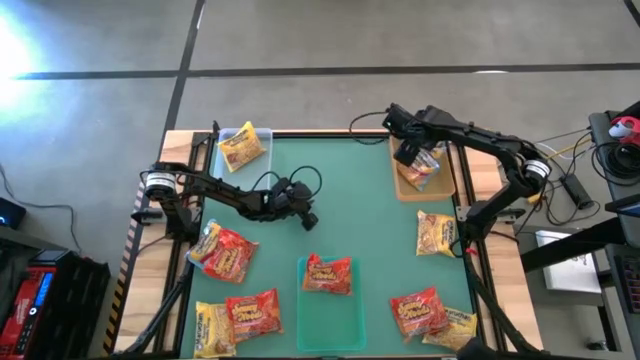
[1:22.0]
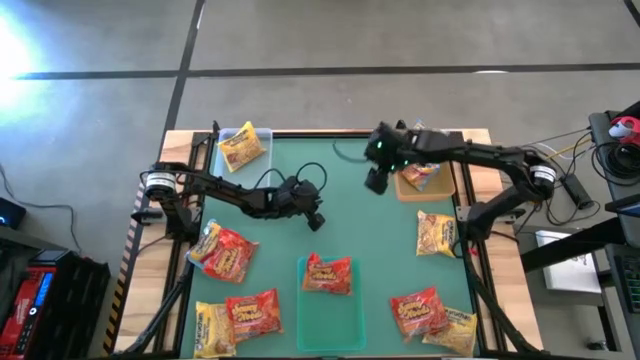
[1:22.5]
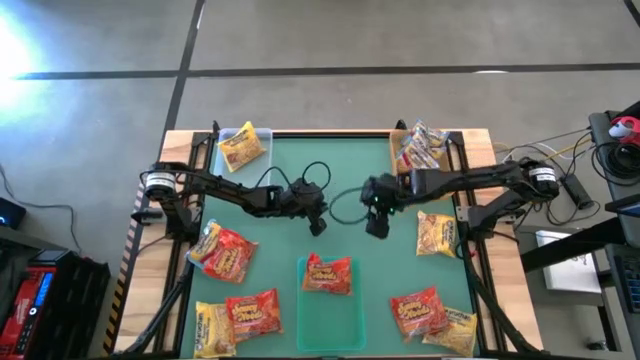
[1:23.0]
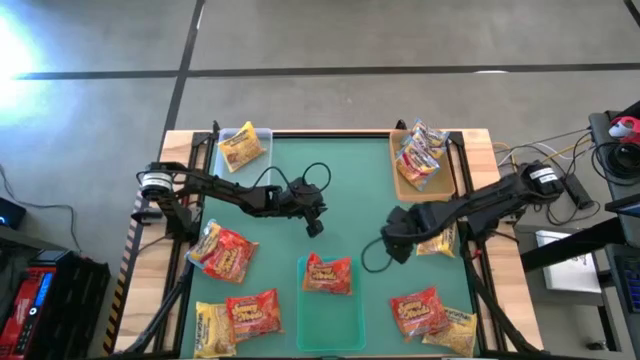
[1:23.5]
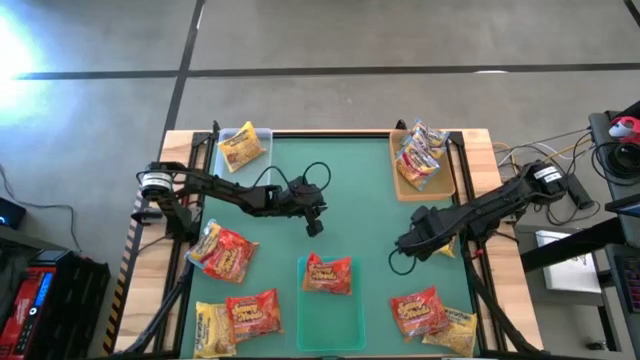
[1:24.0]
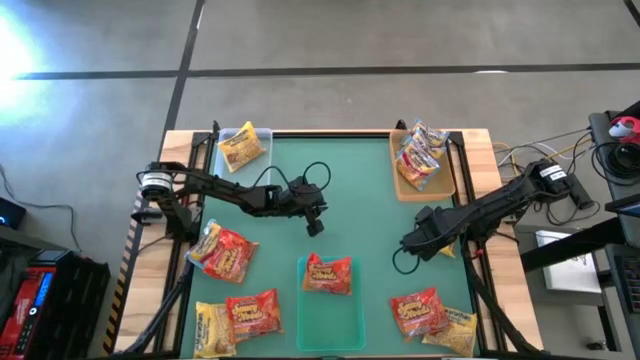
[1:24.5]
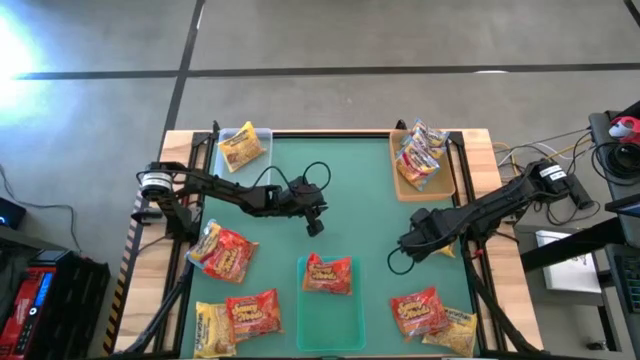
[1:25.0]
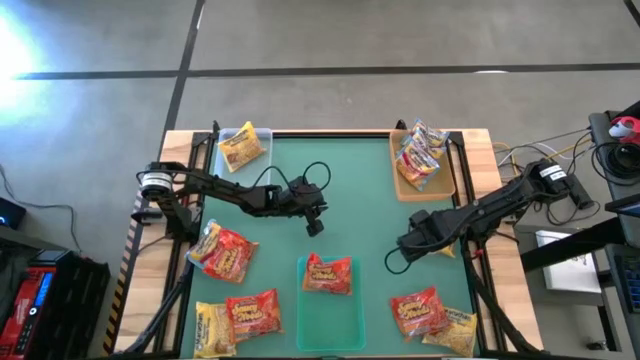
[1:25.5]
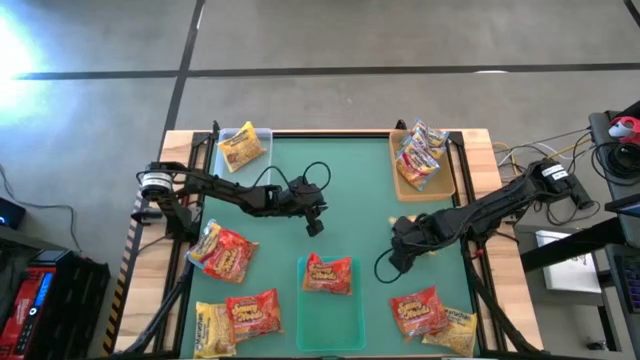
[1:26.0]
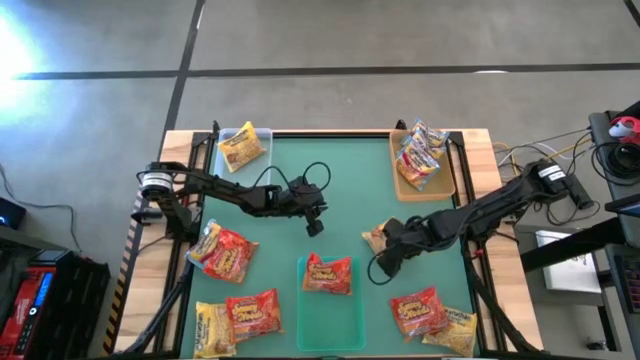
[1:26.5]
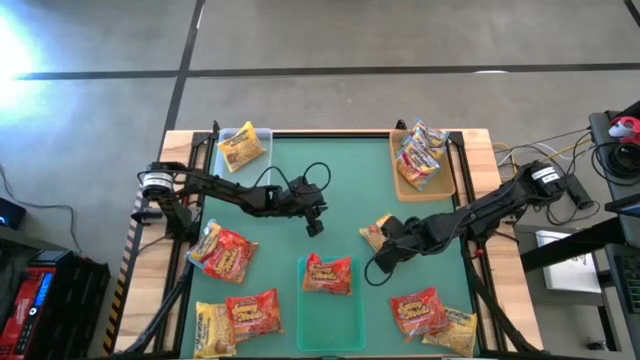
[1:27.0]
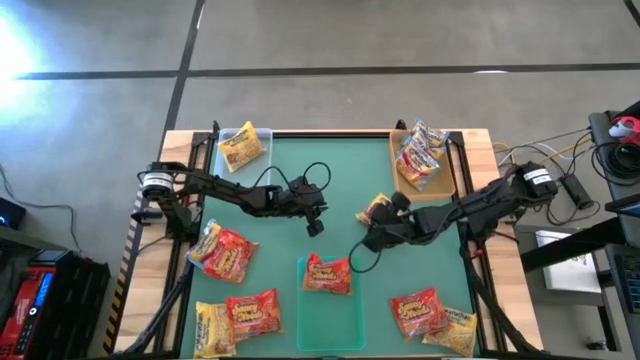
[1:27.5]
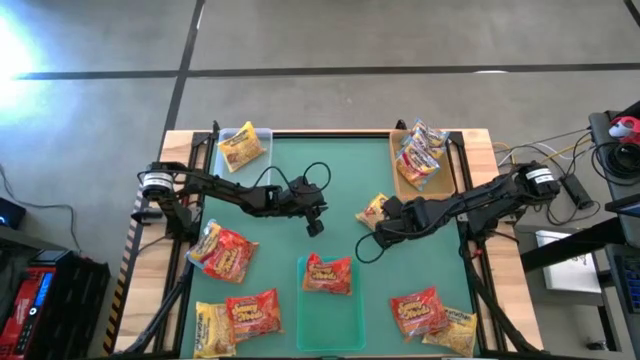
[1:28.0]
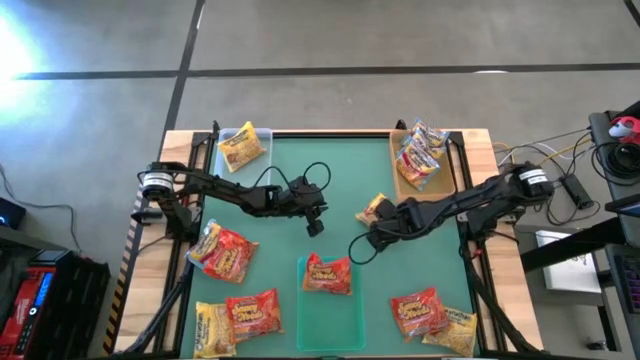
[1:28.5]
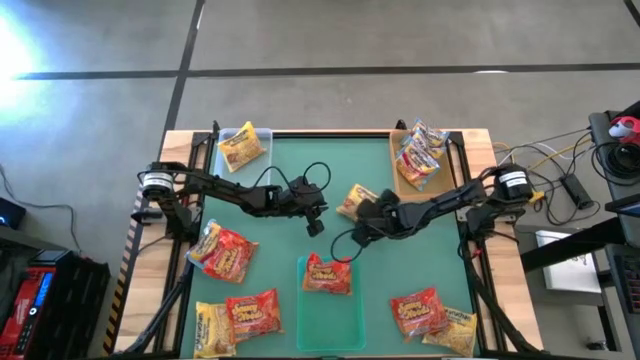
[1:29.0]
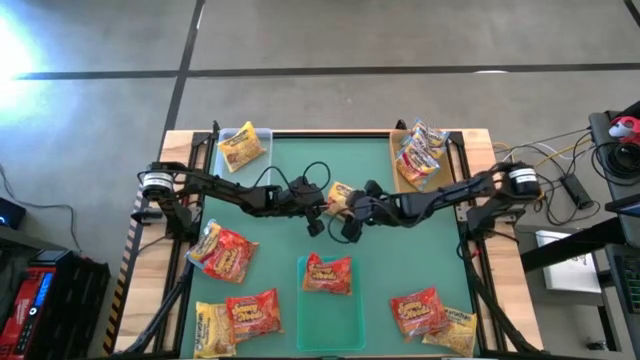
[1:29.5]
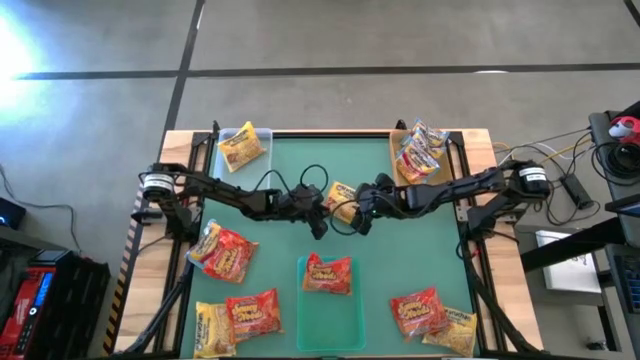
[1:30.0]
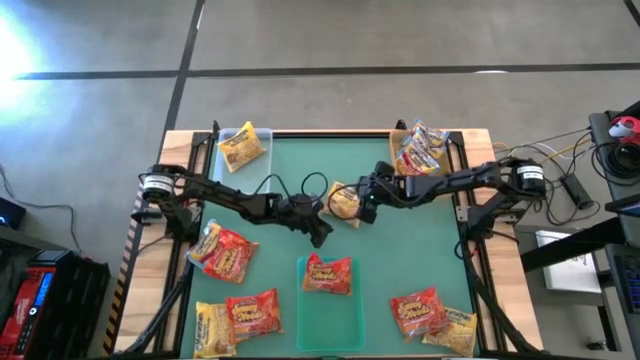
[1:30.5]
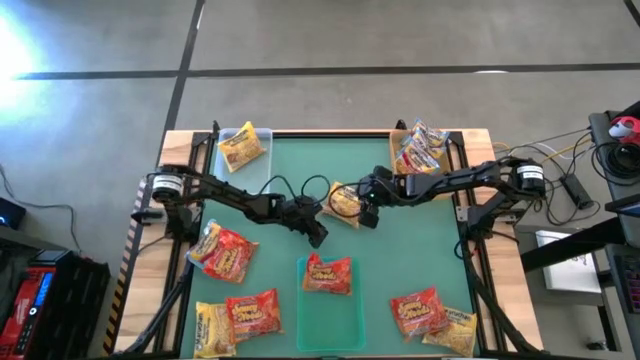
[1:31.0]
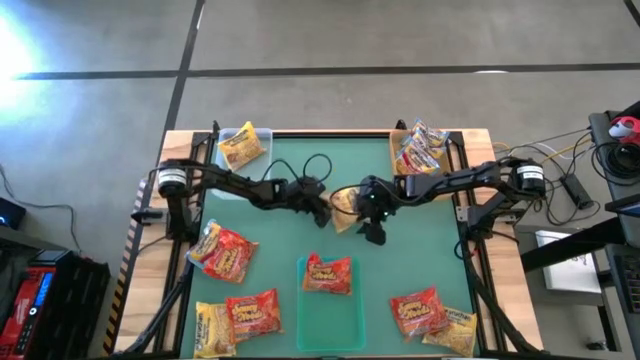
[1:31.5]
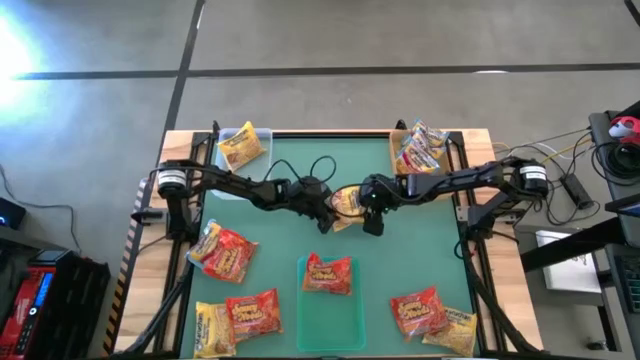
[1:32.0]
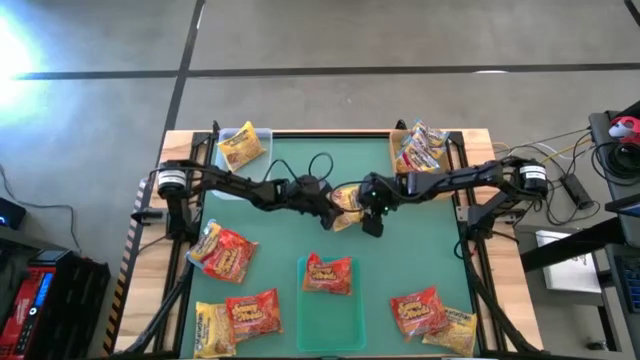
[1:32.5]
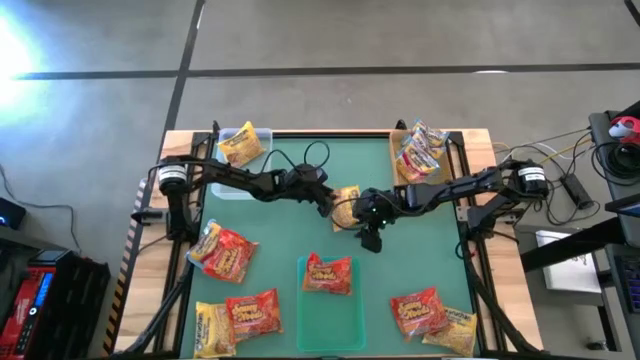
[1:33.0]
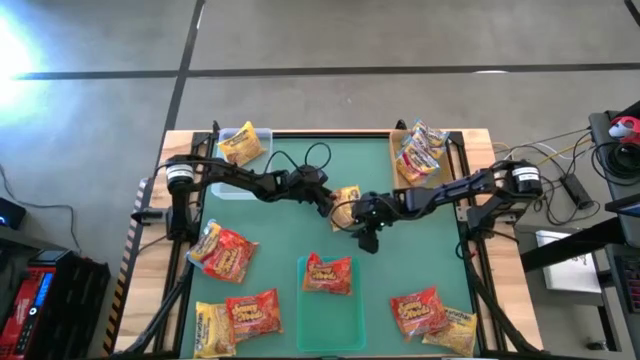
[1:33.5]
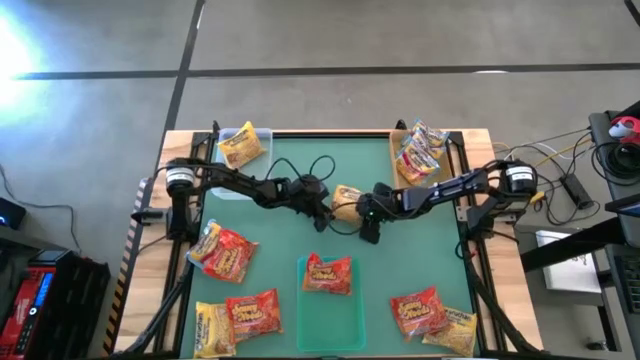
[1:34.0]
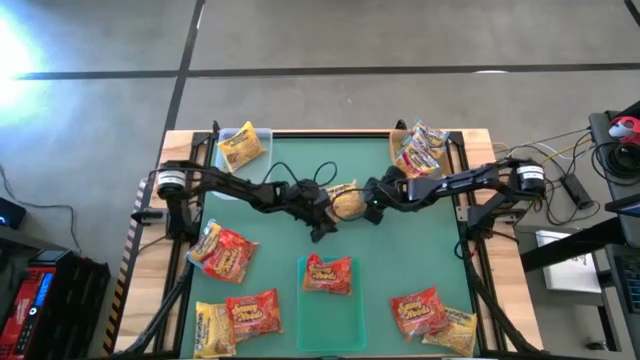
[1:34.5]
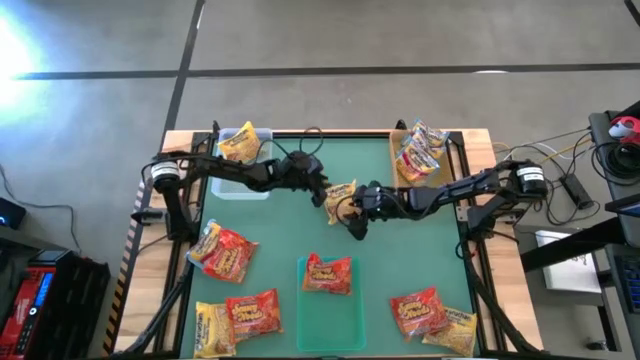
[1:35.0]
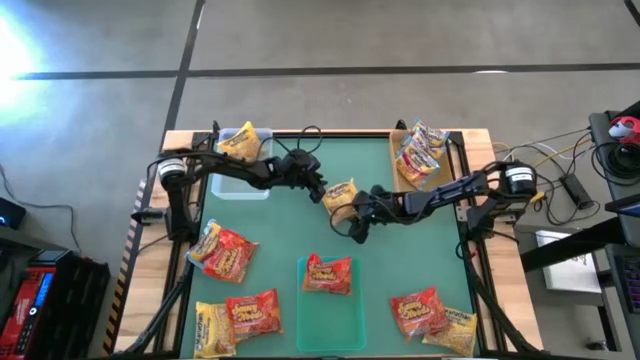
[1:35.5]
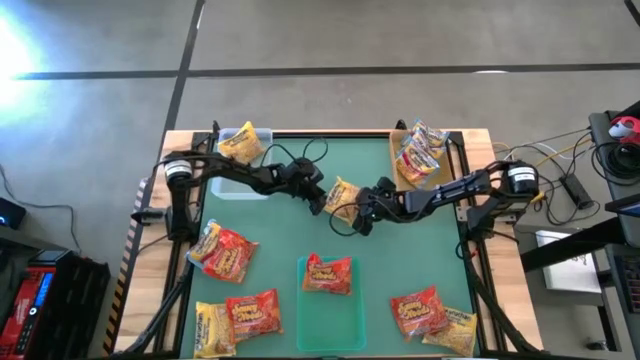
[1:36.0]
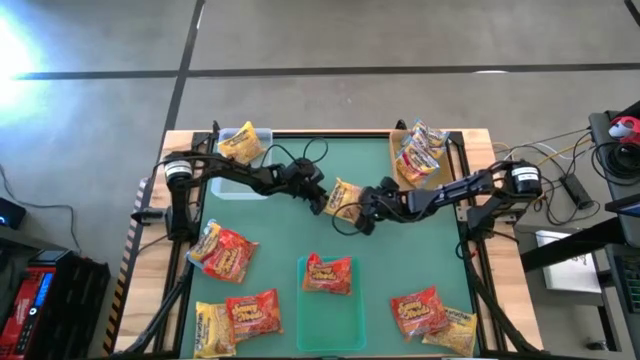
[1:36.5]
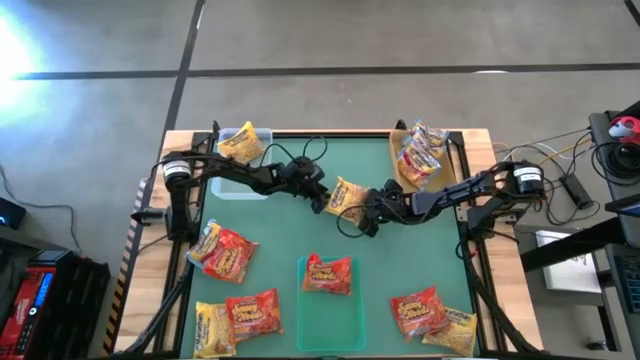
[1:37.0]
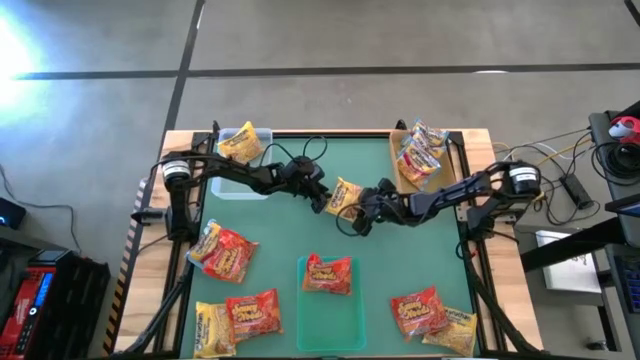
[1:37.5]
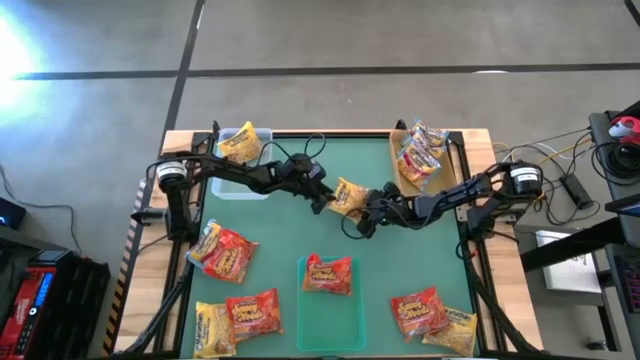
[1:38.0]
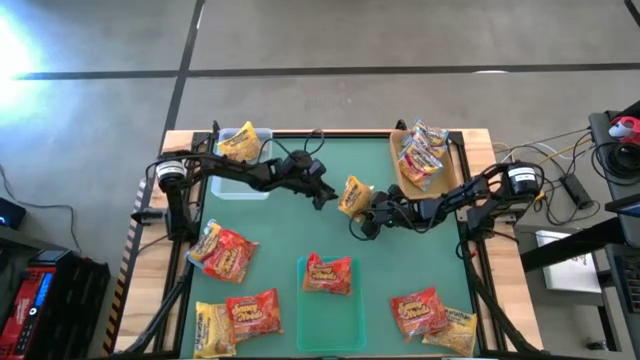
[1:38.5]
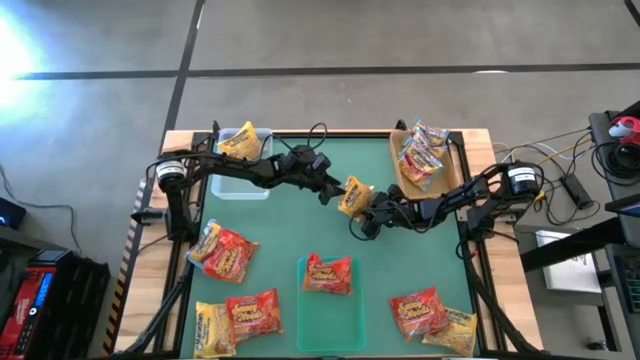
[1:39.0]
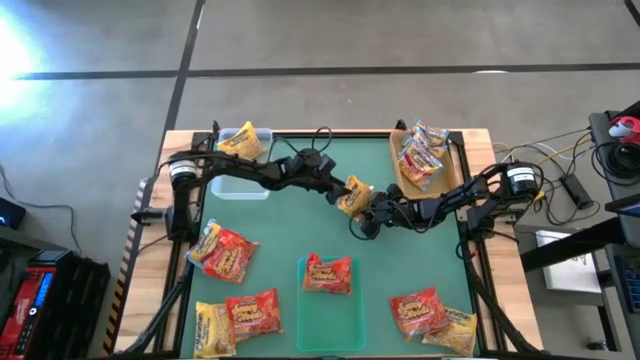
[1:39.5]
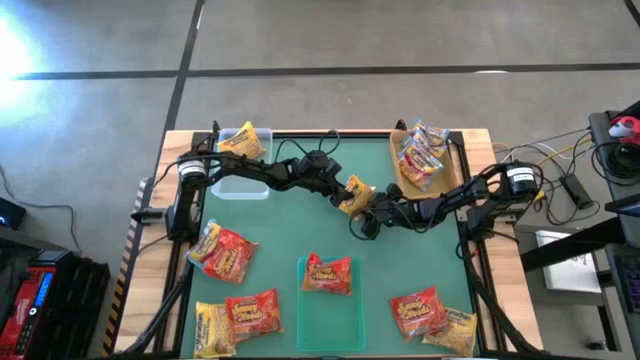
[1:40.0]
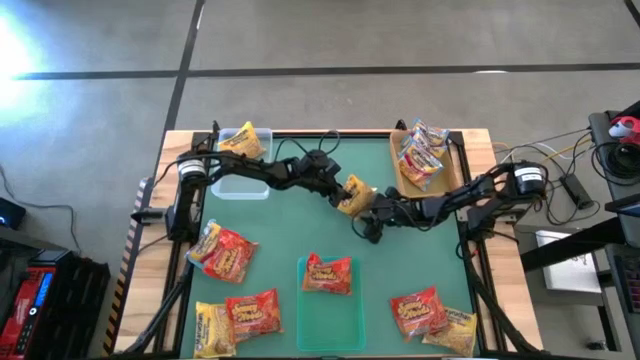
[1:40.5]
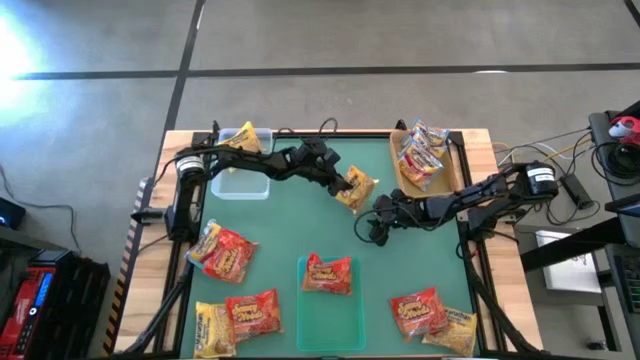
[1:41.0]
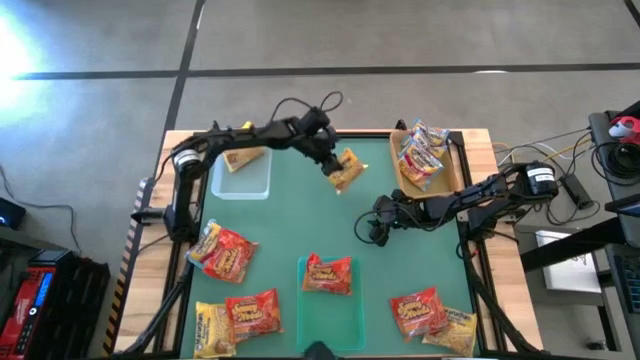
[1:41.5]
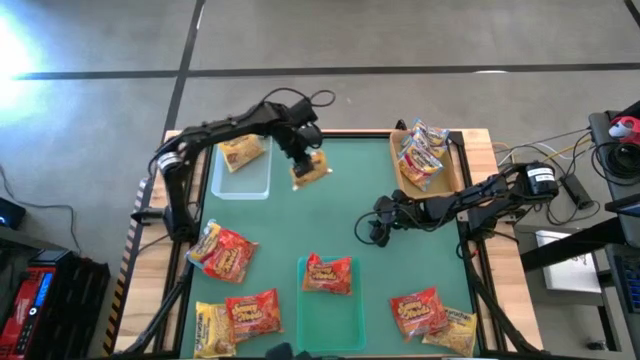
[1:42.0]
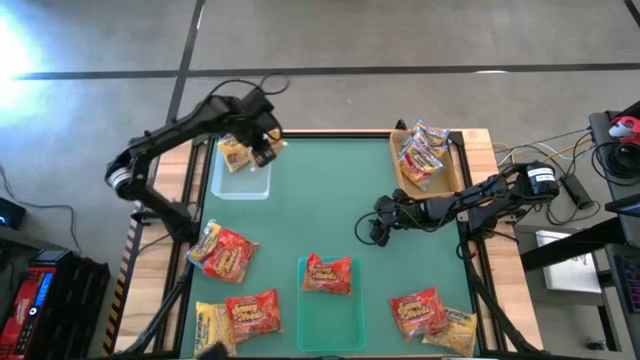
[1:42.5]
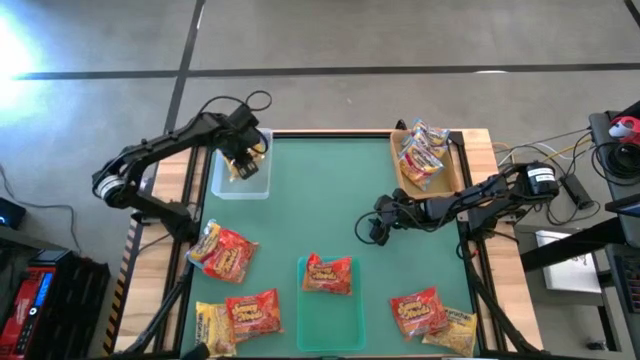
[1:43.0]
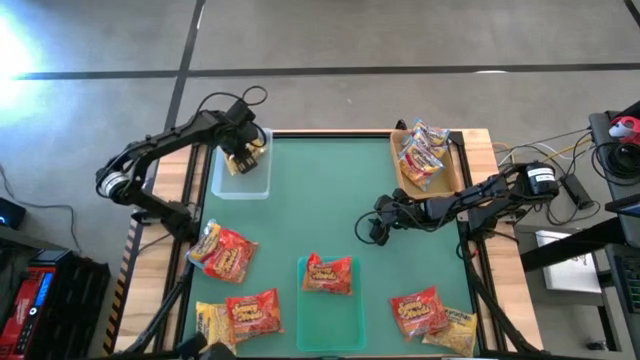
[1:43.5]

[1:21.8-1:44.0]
Task: Sort Maruchan noodles
Put the yellow noodle pack into the transparent bin
